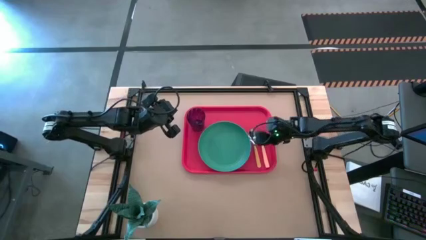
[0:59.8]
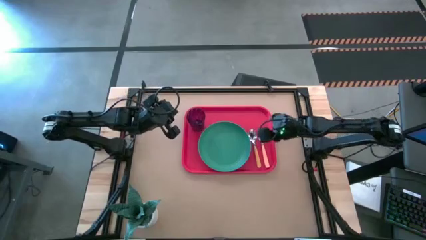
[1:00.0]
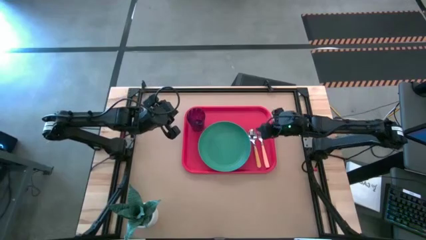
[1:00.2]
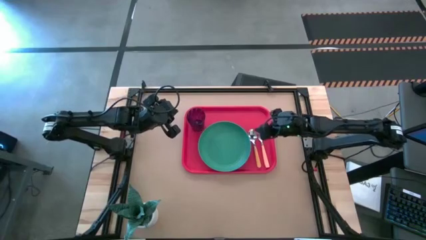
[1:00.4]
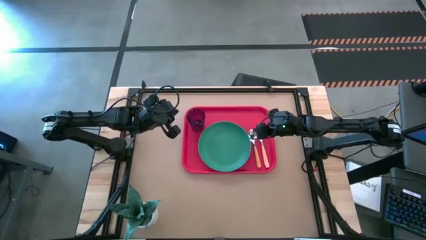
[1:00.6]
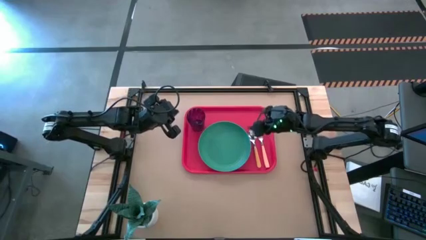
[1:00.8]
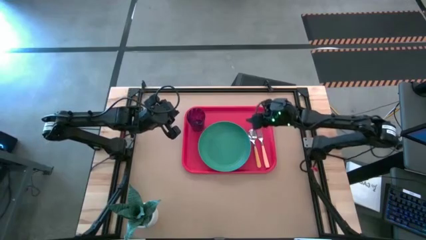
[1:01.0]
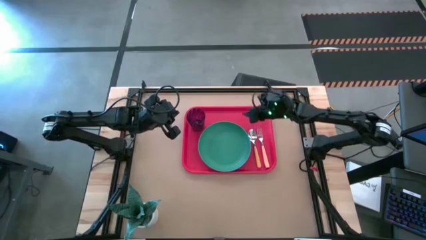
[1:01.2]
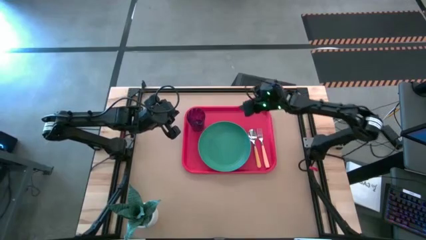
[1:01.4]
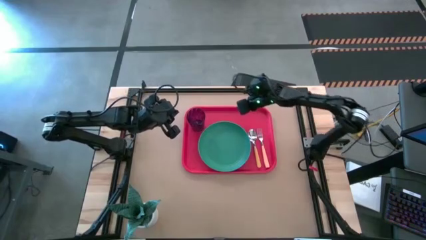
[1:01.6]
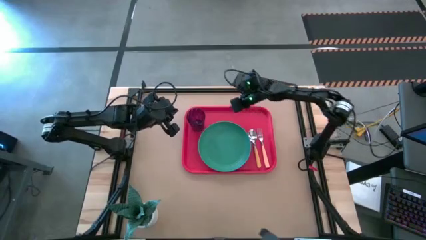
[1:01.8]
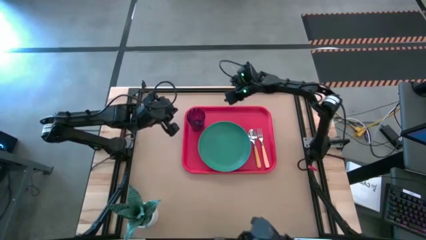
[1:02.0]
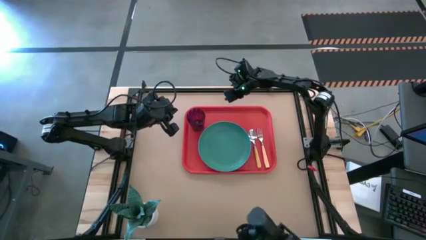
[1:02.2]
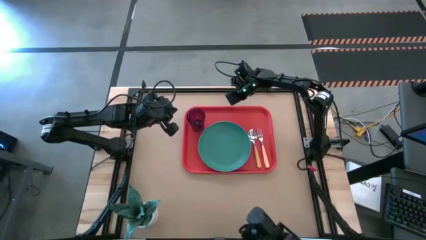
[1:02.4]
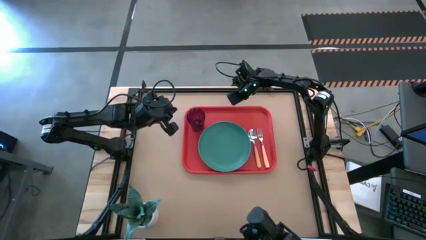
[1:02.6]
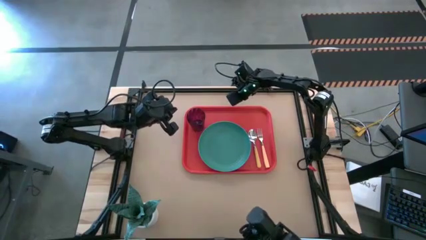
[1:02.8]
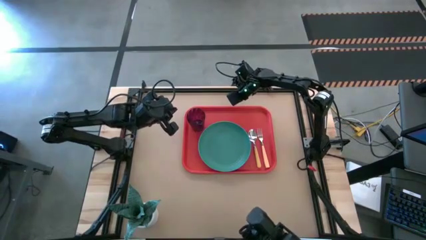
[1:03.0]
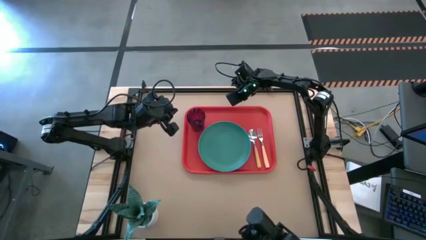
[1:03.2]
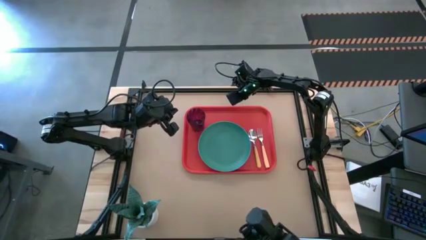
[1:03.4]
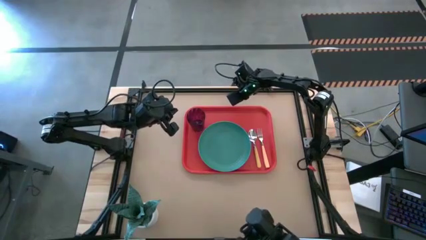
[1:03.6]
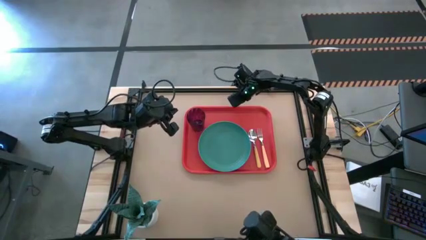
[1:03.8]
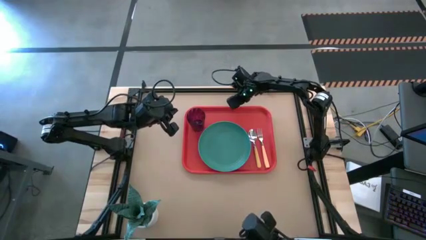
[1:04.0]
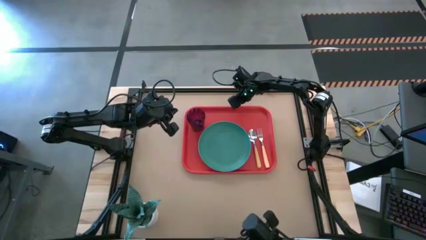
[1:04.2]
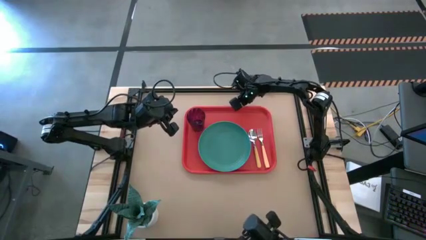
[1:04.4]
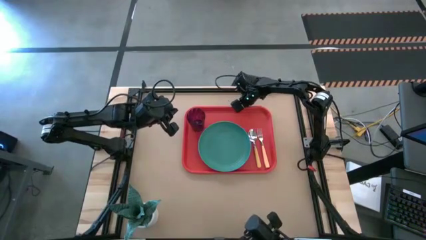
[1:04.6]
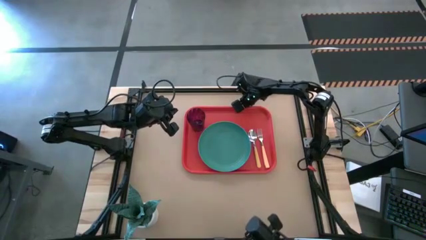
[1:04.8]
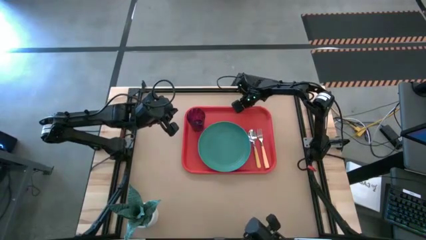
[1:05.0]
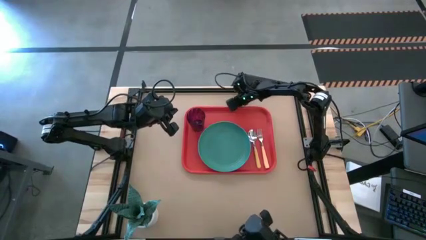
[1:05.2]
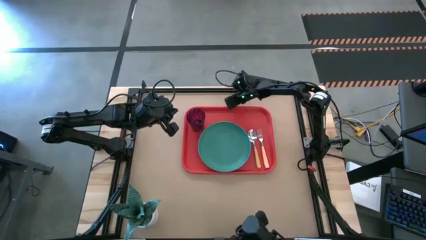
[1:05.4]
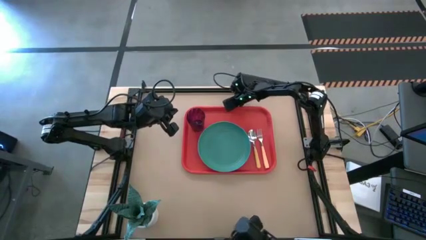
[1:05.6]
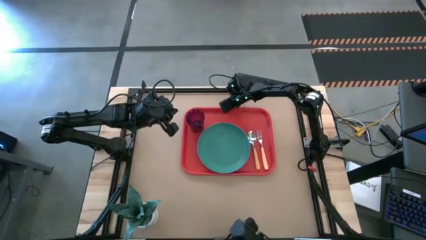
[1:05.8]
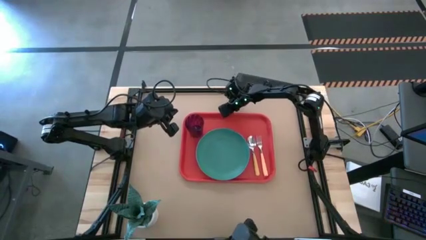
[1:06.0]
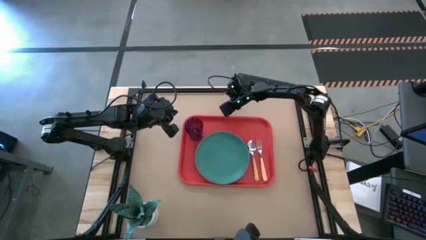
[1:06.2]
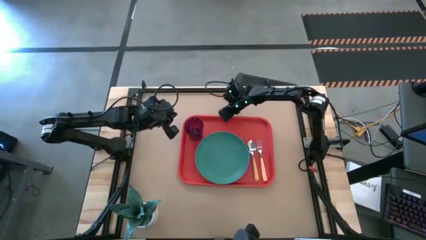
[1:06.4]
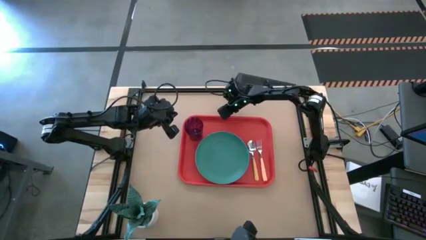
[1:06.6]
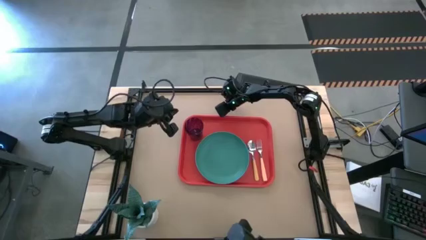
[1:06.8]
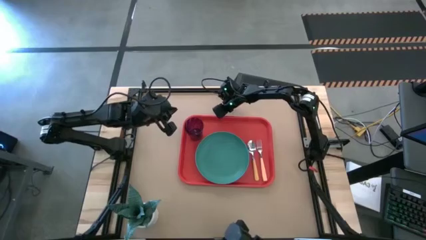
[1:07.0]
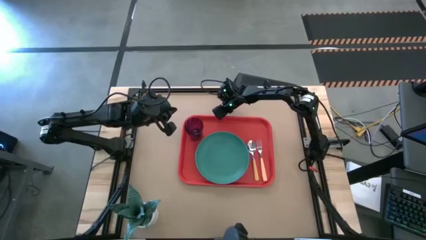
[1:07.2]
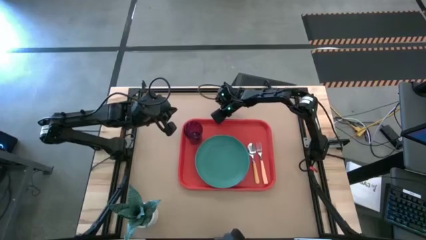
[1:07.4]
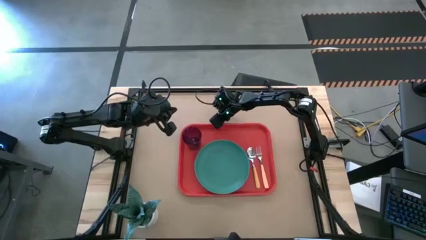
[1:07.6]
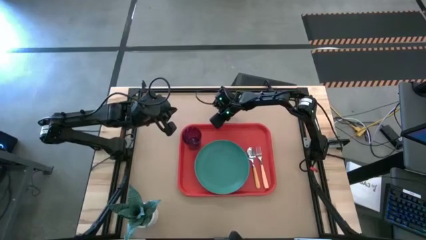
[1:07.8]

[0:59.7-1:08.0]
Task: Pick and place plate/cup/fork/spoon on tray
Adjust the red tray

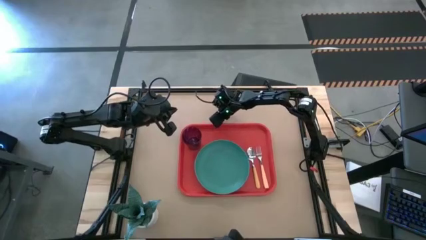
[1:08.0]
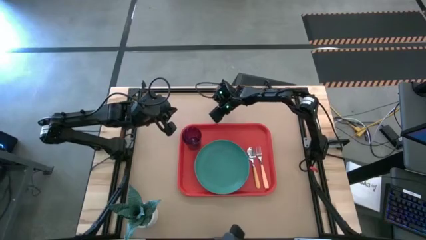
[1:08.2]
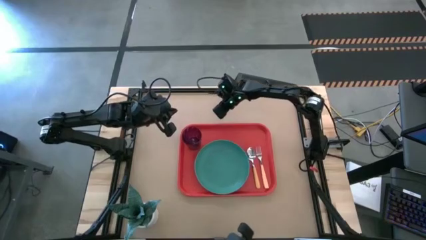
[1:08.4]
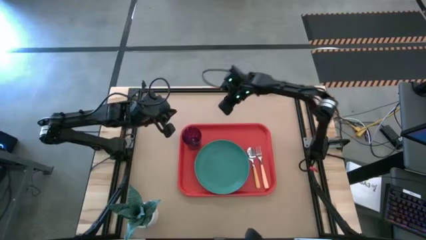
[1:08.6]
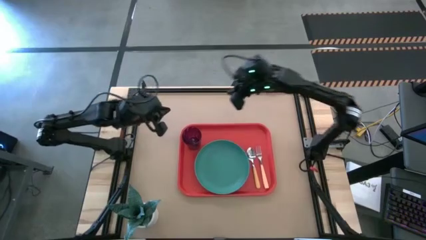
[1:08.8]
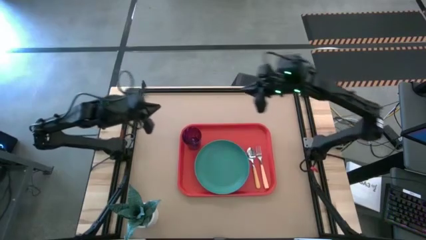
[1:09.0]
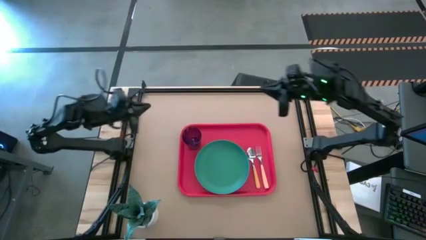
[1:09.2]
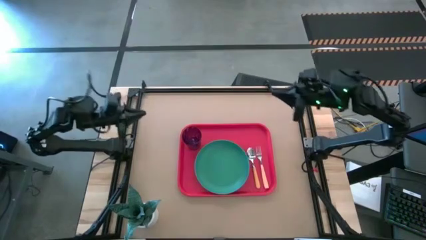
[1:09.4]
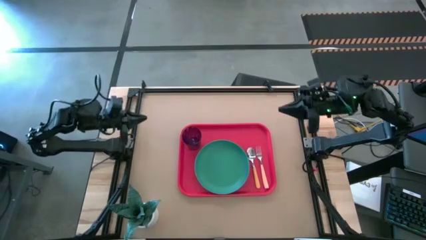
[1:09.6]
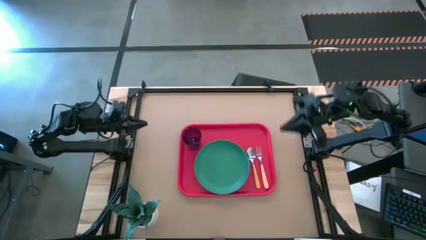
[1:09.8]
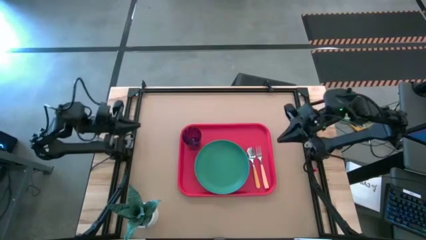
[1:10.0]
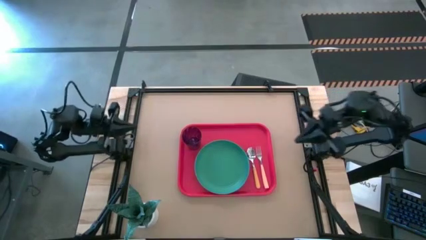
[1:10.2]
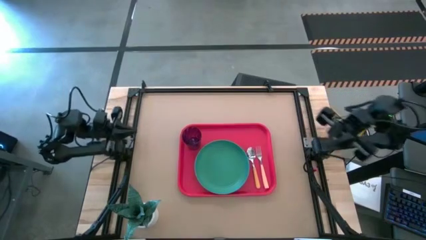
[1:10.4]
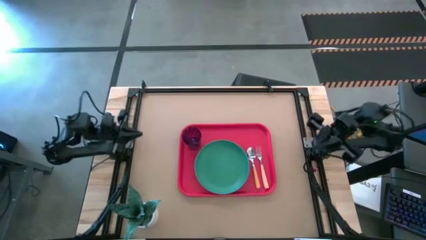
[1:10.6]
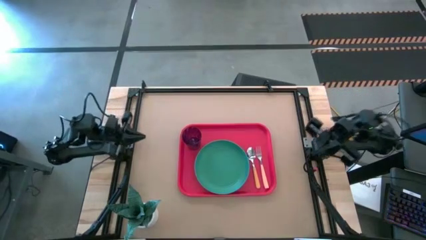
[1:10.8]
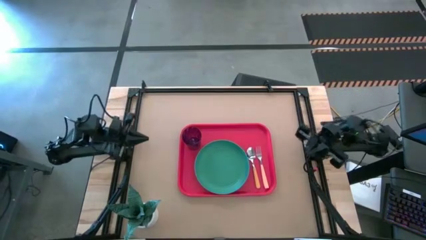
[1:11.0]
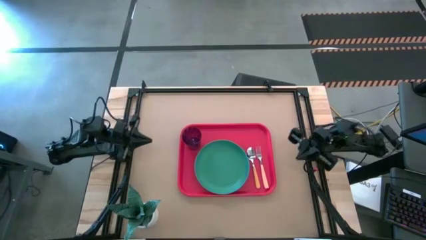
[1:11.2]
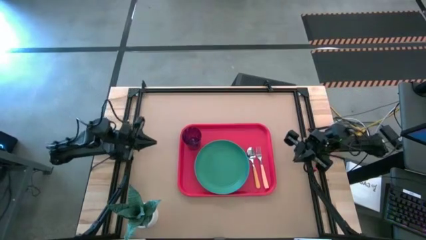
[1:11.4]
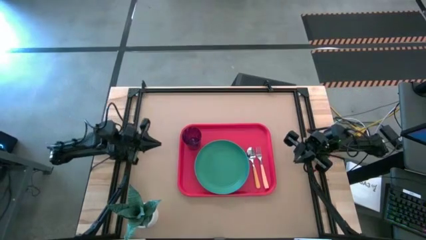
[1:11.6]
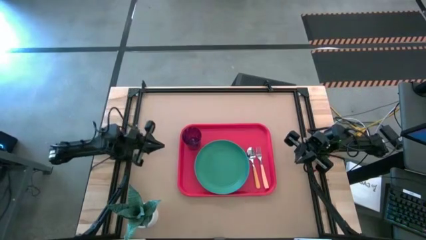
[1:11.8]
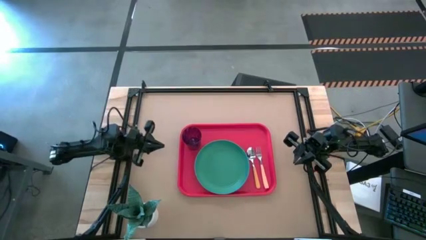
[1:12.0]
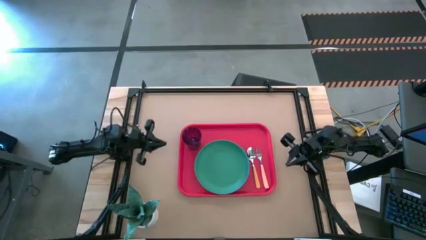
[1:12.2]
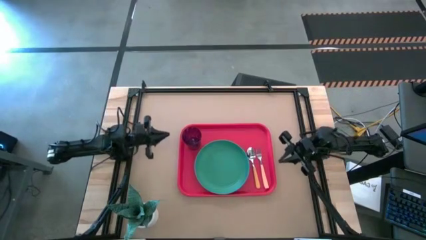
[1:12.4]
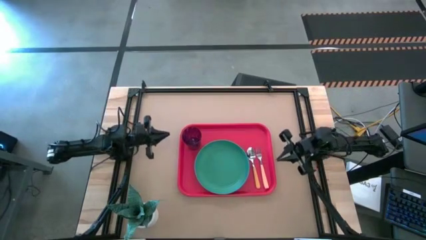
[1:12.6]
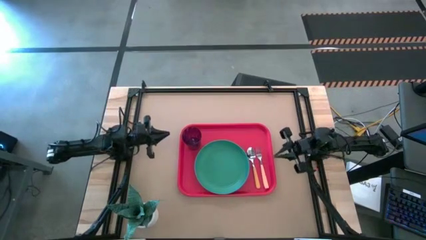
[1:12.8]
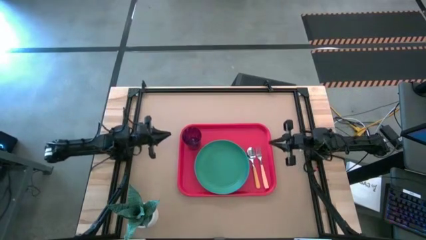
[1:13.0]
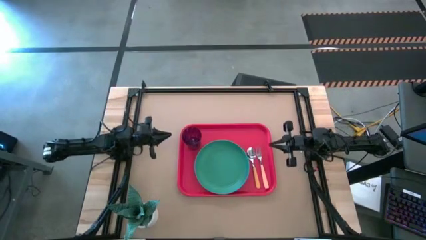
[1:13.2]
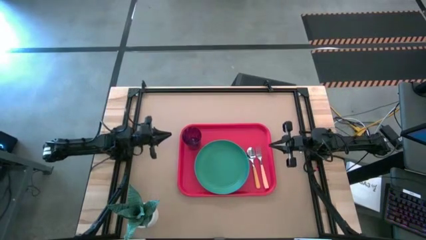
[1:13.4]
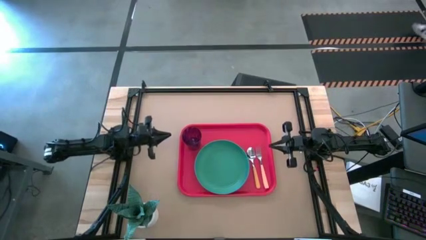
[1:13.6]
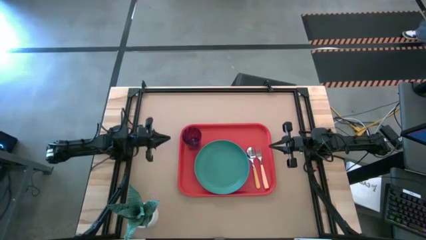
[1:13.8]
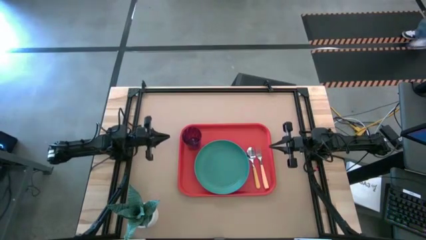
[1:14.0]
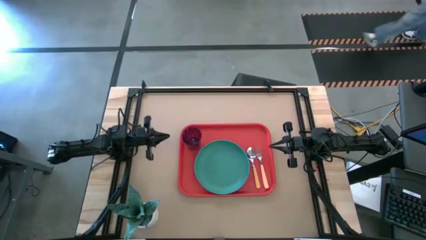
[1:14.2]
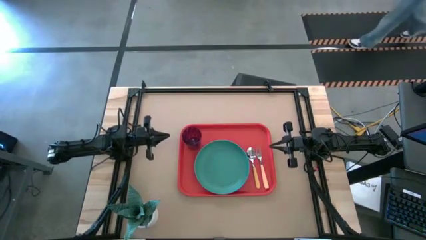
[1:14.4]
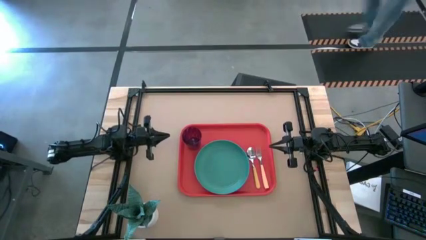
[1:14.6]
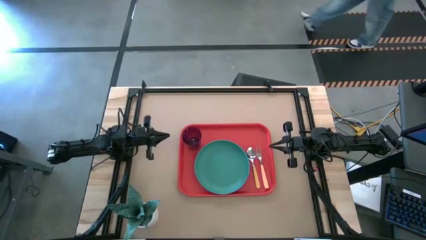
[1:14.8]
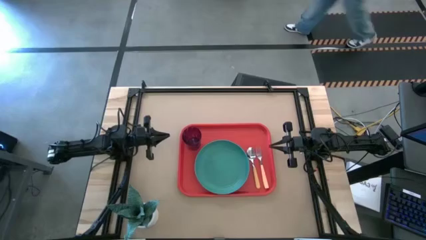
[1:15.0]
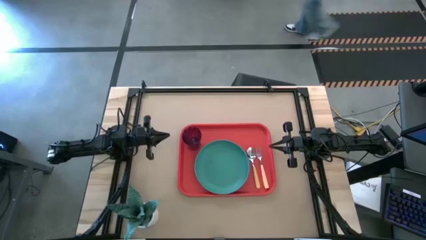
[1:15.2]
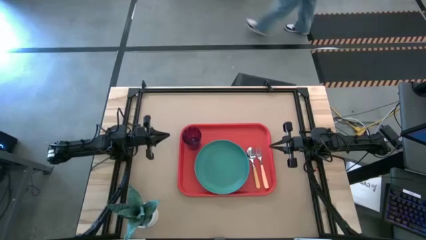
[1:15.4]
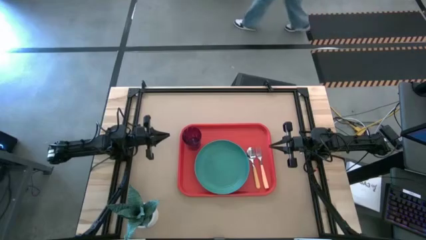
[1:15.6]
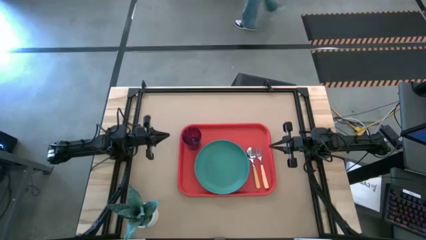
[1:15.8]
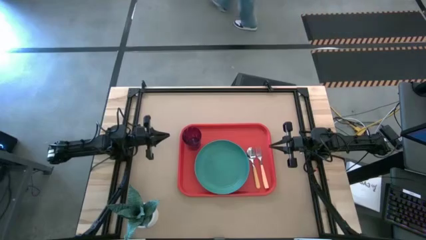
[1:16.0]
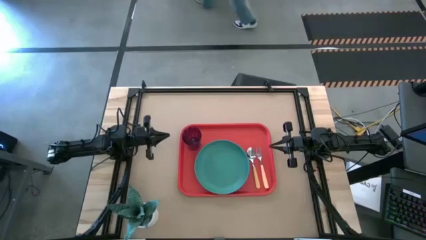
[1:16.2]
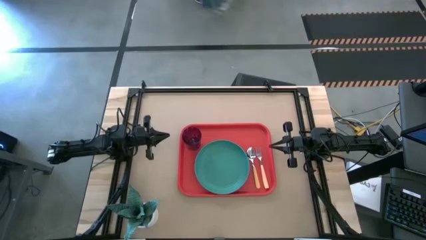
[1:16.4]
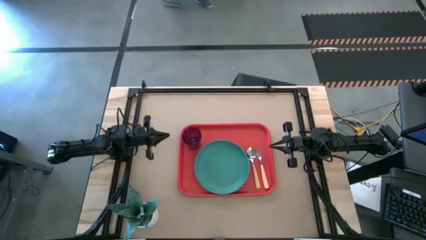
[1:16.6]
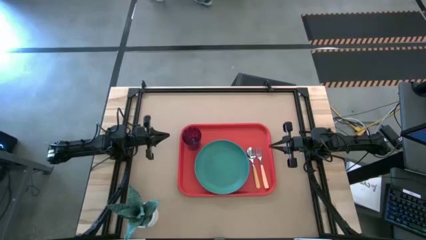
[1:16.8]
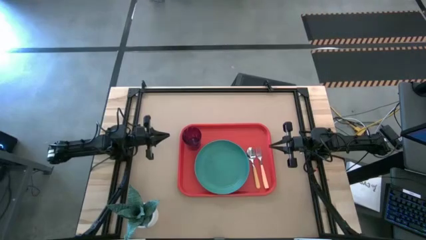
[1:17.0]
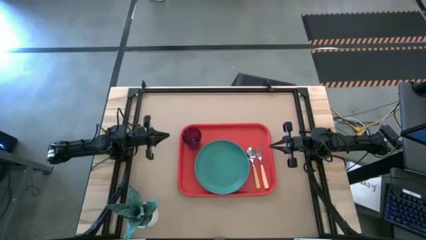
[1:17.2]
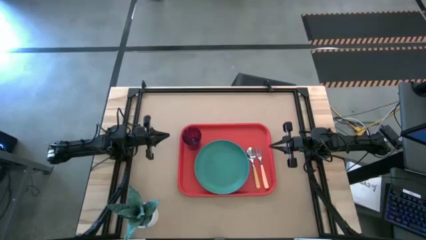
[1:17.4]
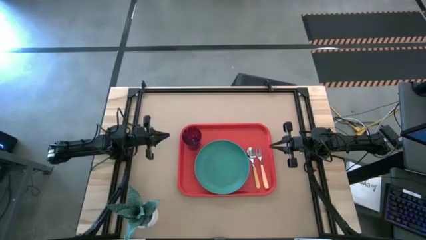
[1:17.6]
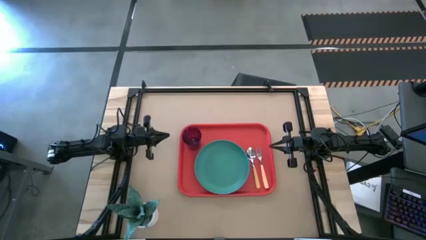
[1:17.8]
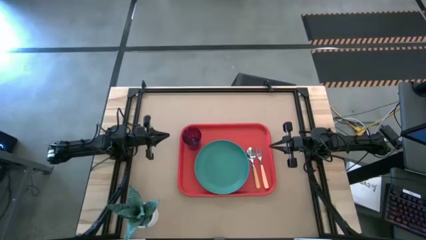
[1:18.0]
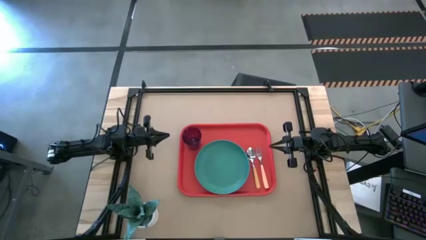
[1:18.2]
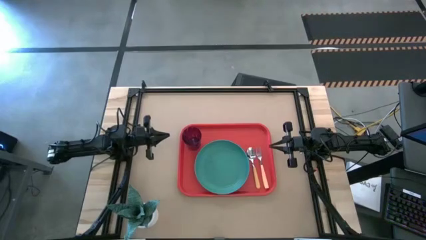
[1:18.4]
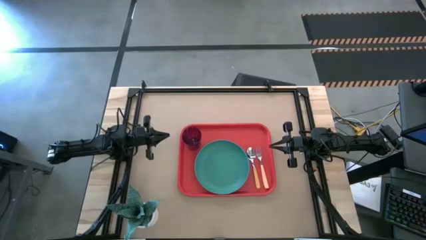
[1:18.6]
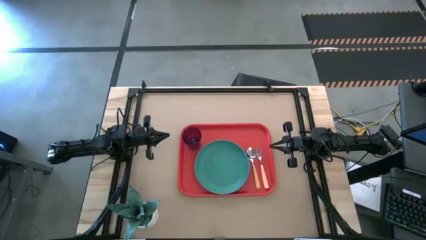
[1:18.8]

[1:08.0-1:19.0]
Return to Home Position
